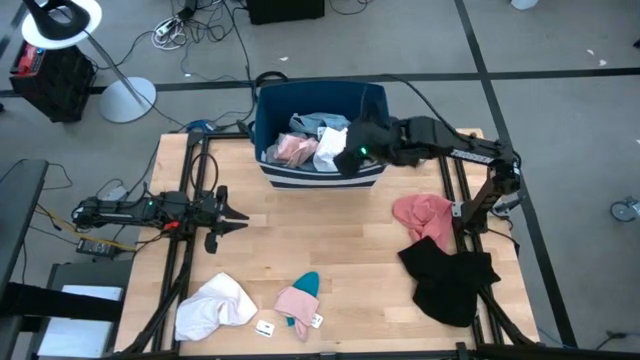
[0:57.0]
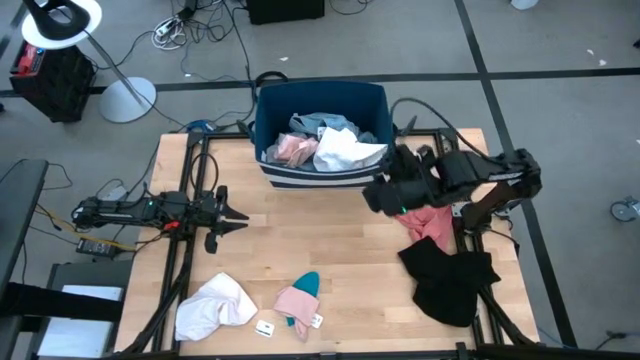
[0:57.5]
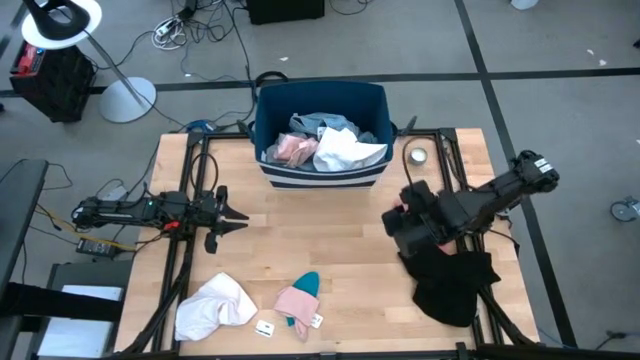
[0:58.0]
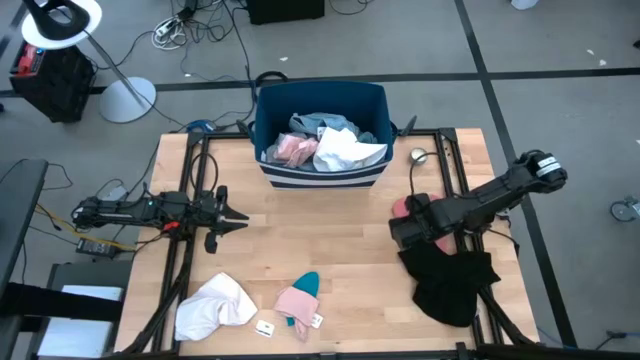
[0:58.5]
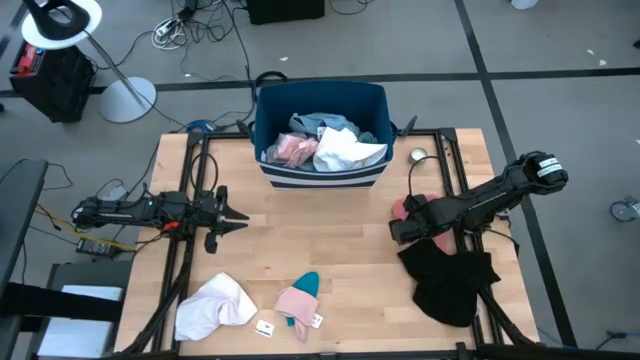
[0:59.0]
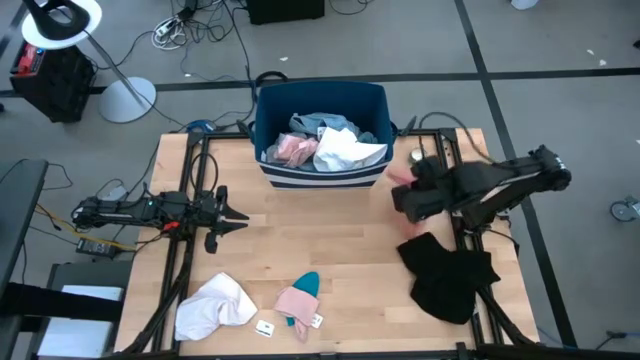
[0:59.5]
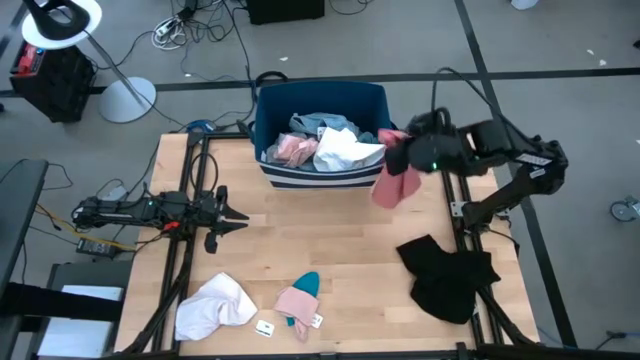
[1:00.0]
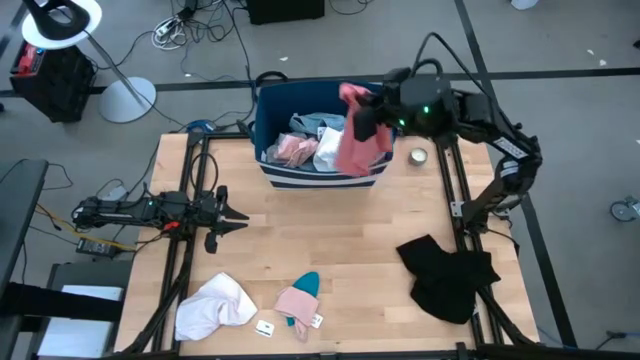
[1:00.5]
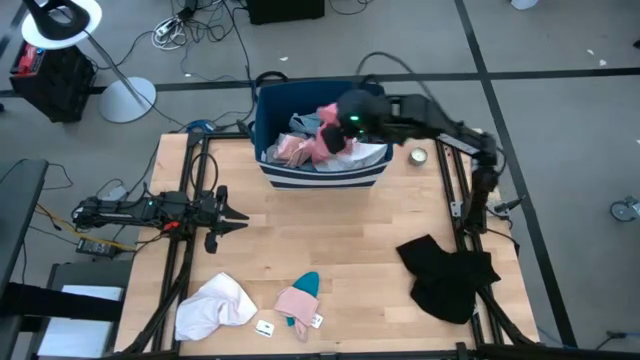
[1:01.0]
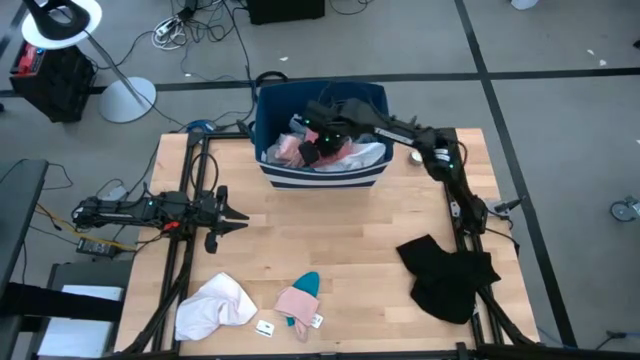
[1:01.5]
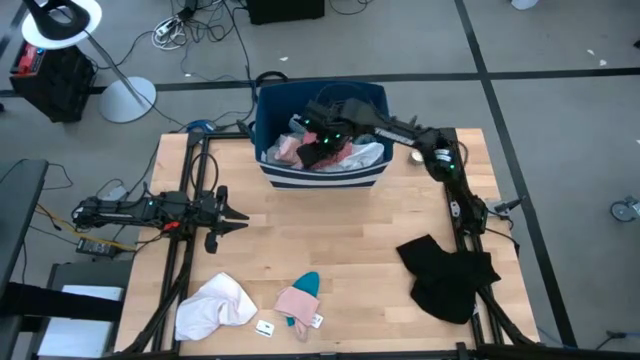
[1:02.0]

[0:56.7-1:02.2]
Task: Sort clothes
Put the pink underwear into the blue laundry bin

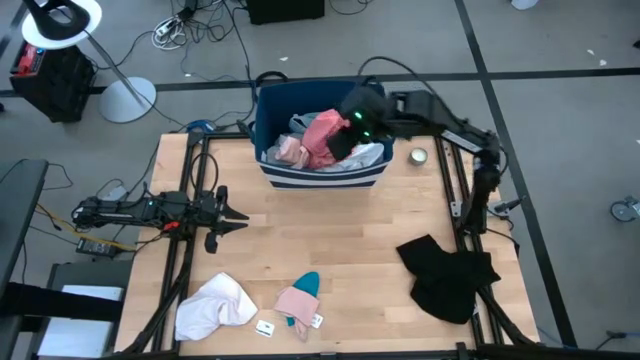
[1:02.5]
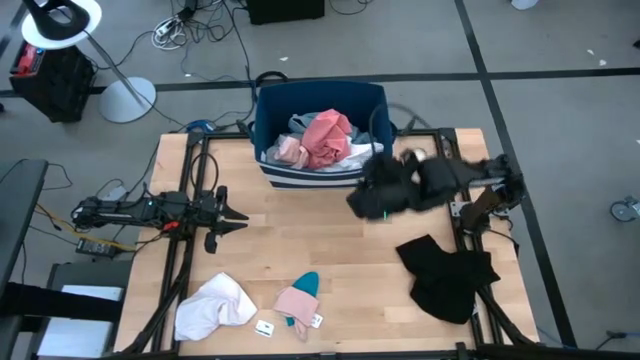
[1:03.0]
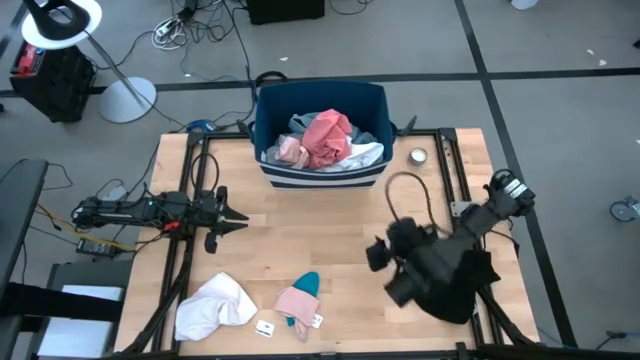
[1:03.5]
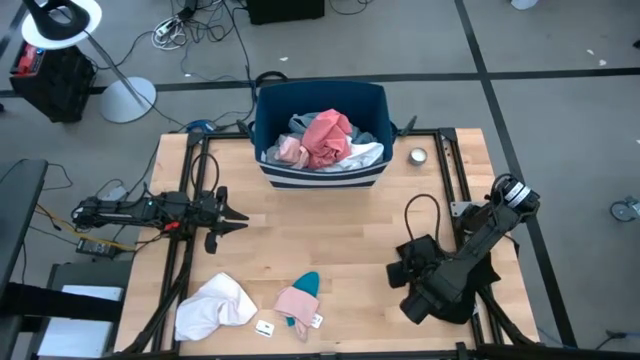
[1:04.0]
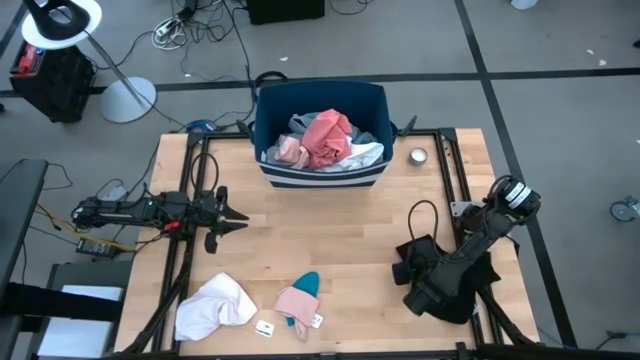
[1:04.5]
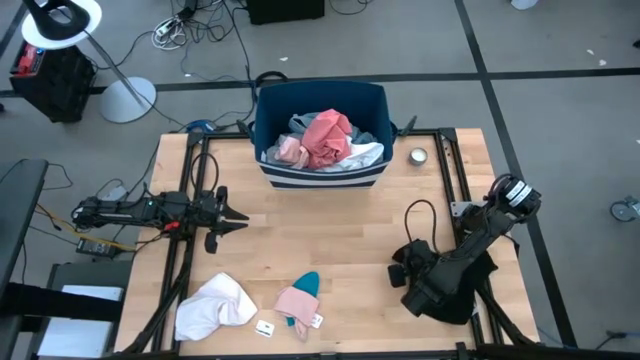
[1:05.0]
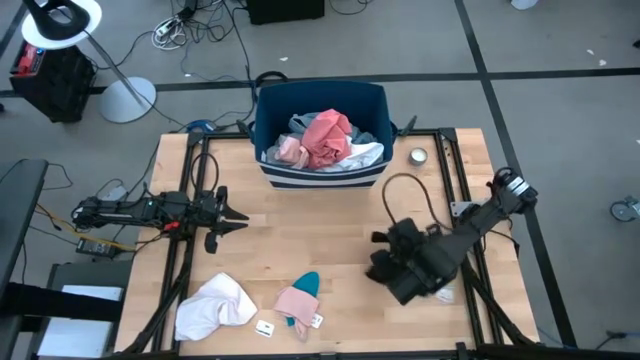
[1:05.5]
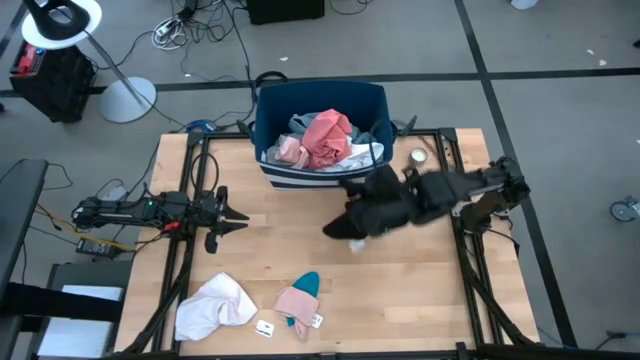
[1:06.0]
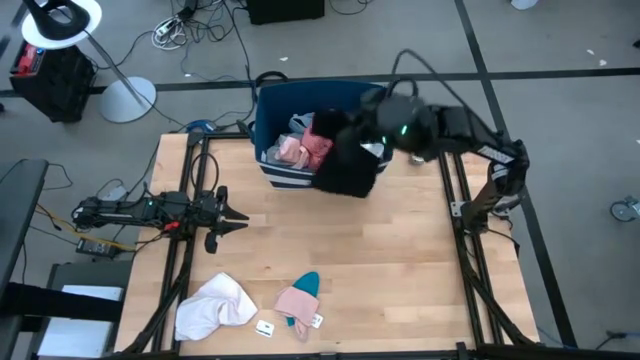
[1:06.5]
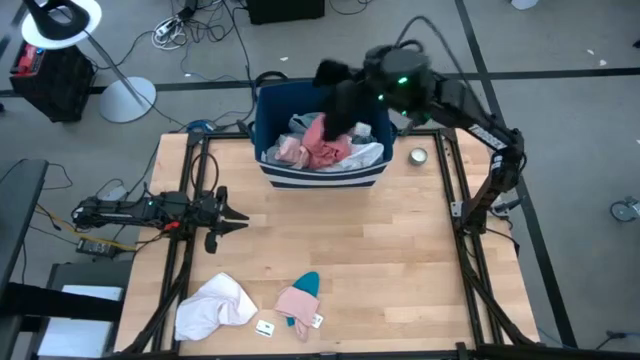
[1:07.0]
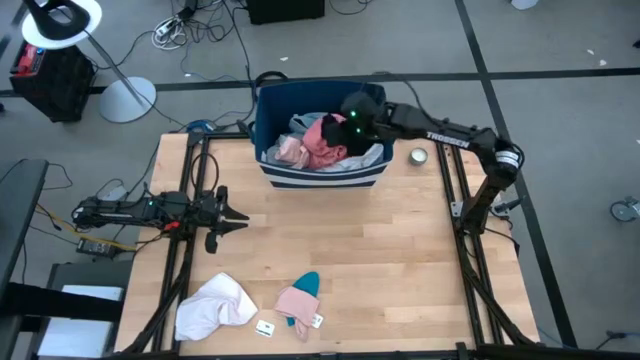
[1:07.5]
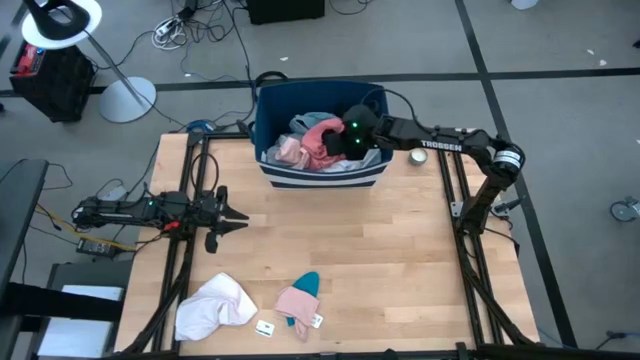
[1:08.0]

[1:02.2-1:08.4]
Put the black shirt into the blue laundry bin

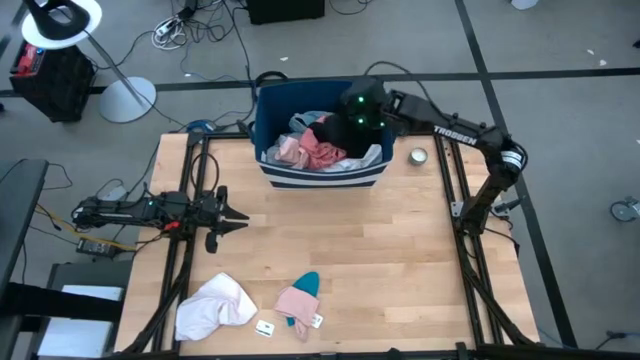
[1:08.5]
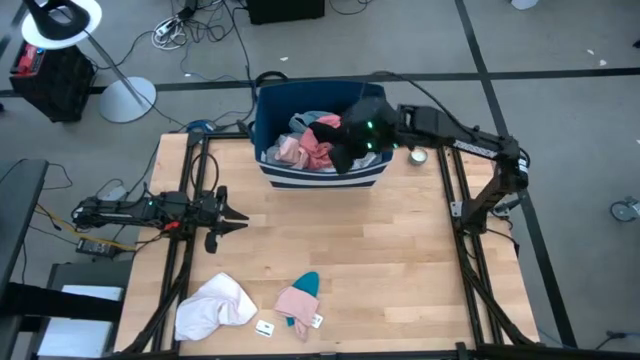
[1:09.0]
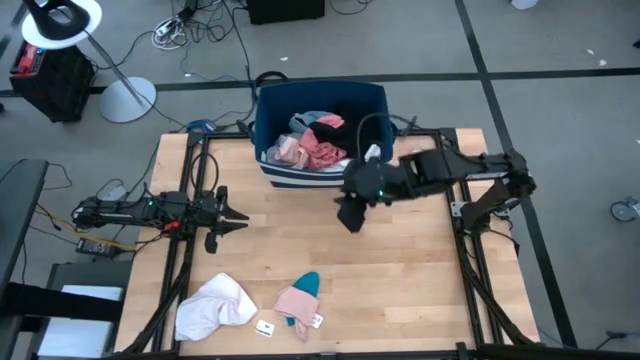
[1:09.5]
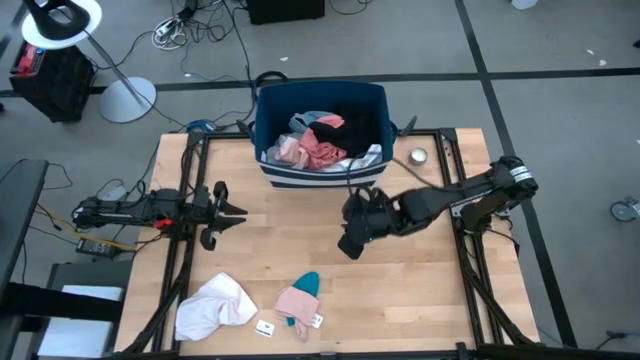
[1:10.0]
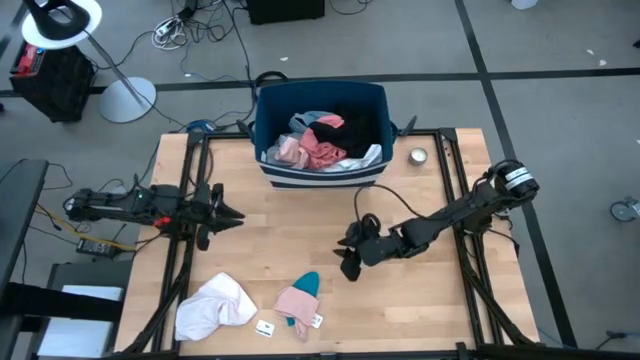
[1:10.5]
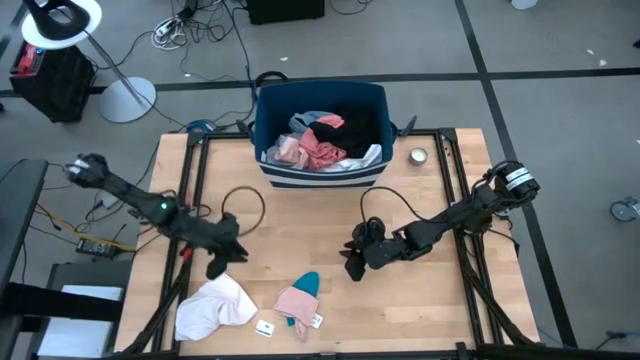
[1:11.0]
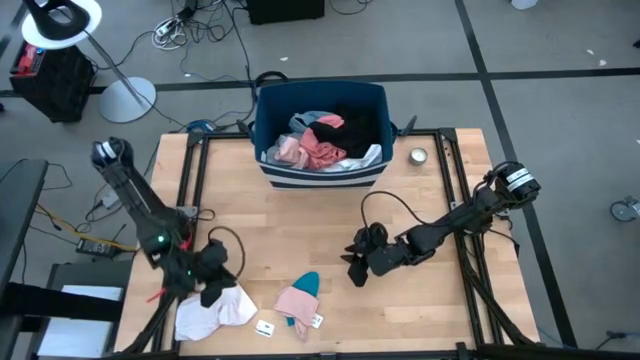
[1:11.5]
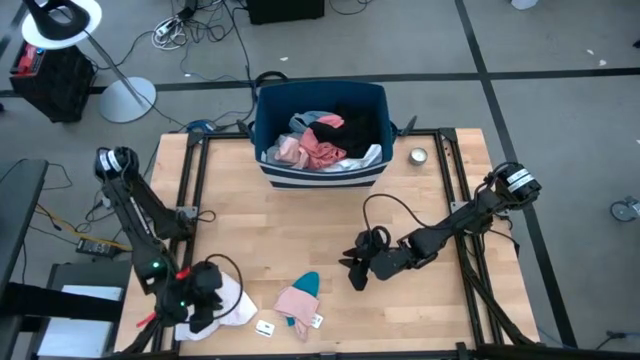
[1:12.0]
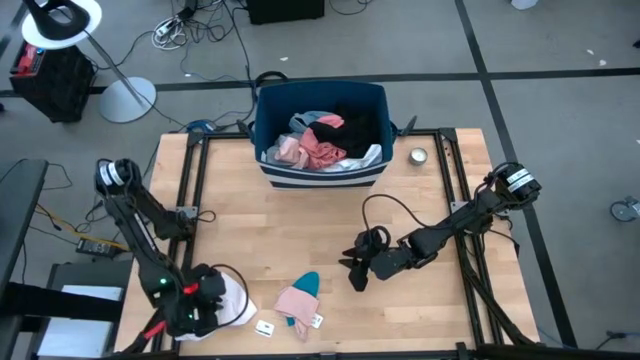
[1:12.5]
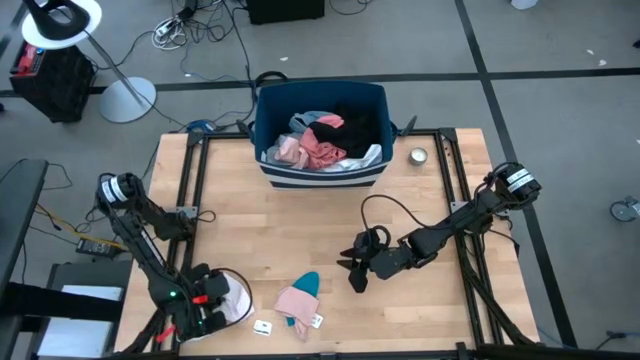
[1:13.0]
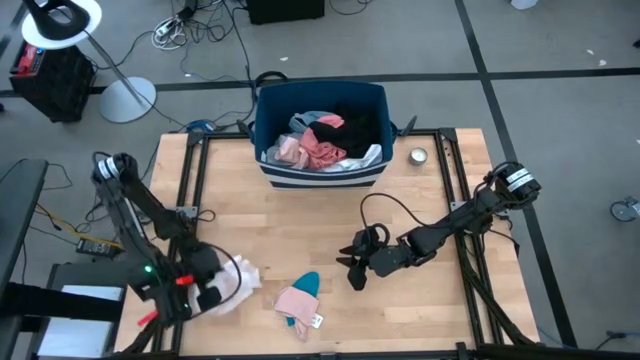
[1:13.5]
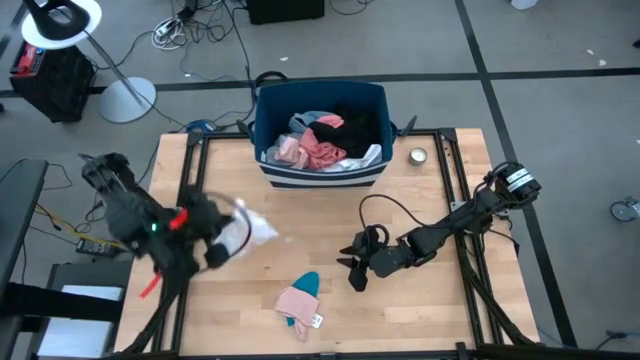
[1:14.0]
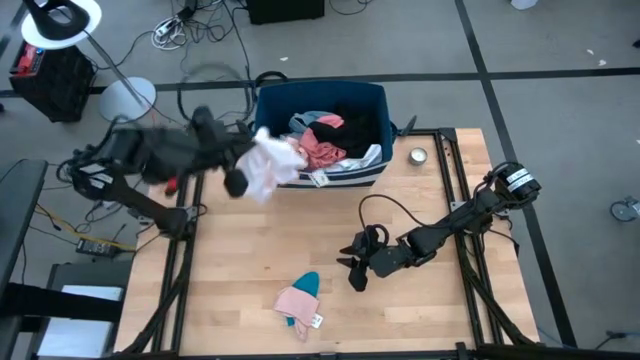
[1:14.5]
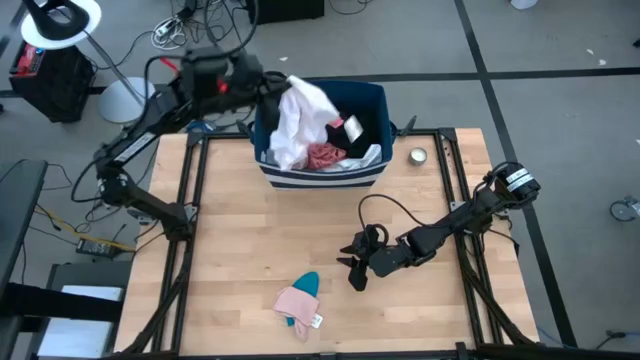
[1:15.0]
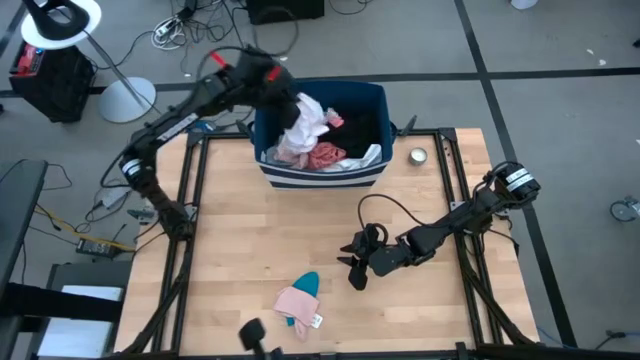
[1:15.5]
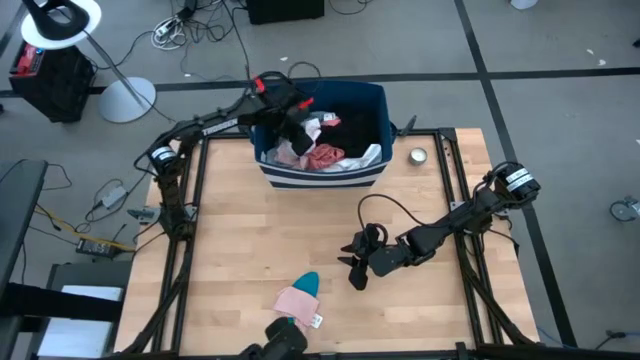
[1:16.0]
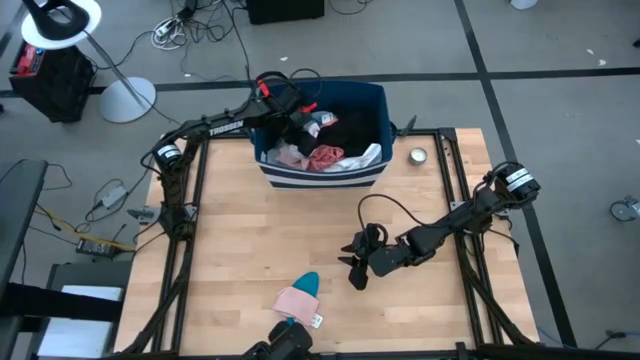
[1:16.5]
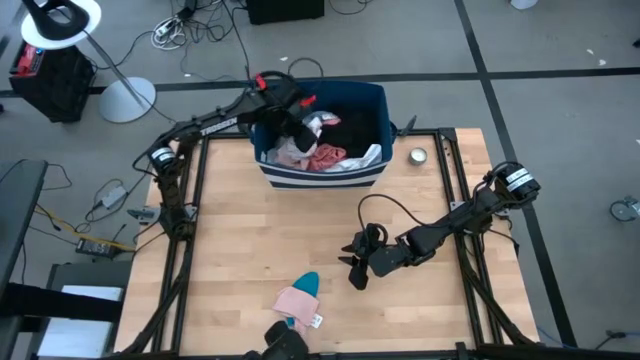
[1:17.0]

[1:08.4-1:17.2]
Put the pink underwear into the blue laundry bin

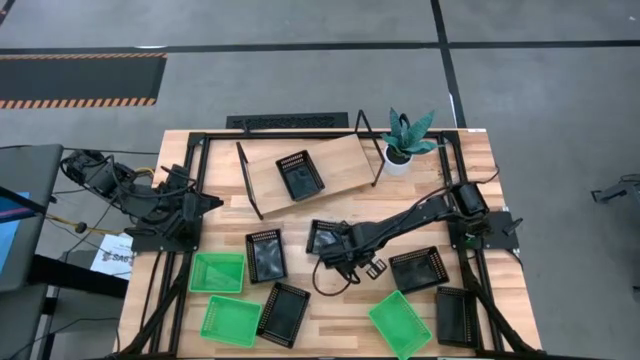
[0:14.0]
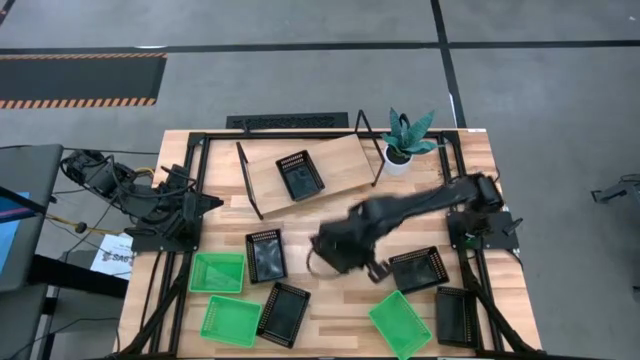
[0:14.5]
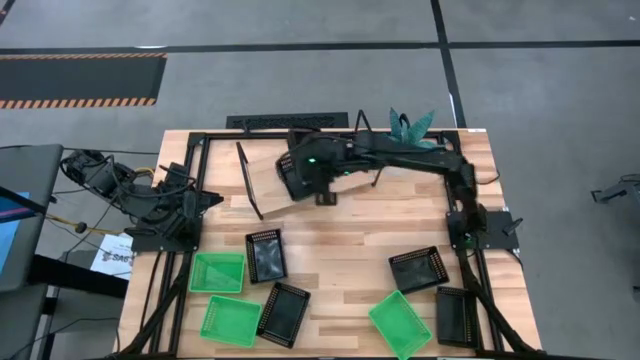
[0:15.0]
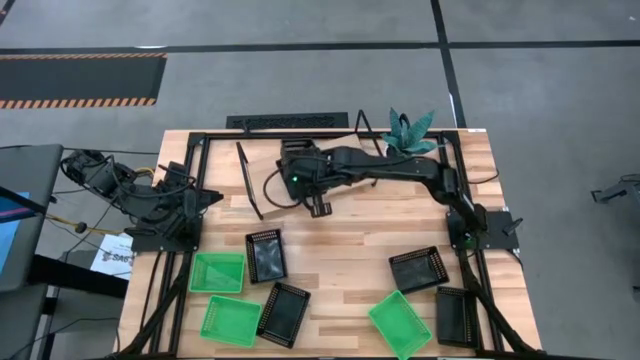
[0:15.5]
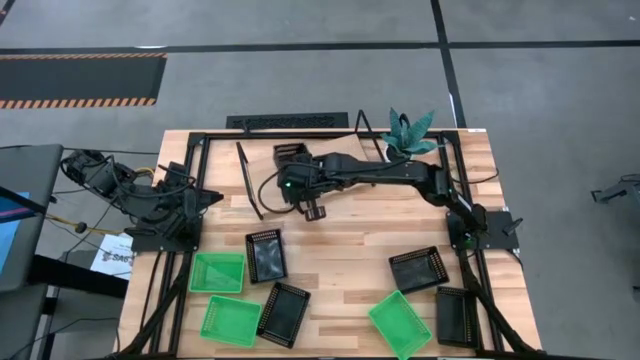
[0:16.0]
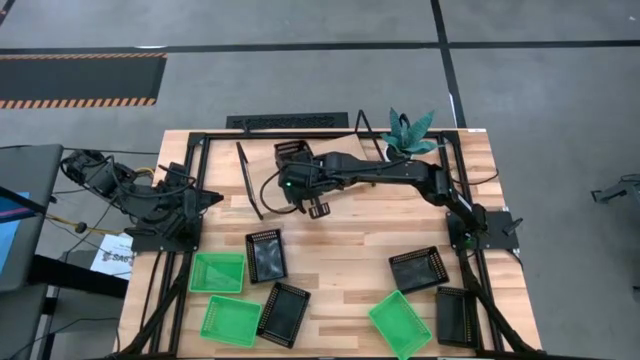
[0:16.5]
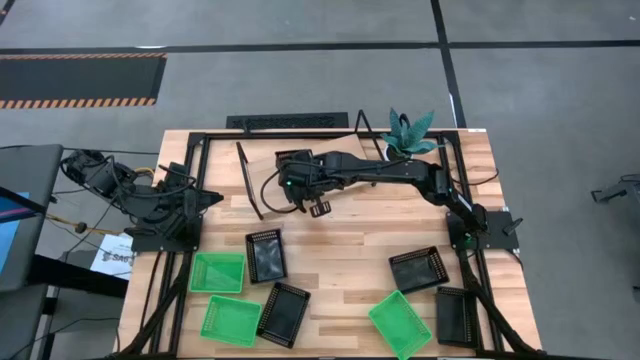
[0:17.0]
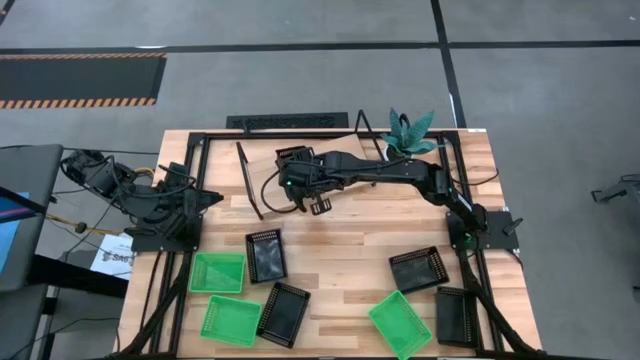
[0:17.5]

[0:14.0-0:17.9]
Task: Stack baskets on shelf by color
Stack the black basket on the black basket on the shelf
